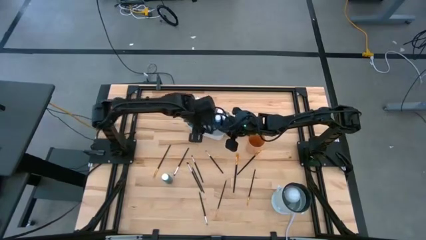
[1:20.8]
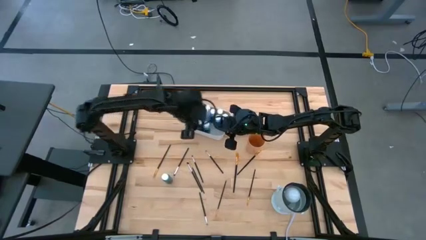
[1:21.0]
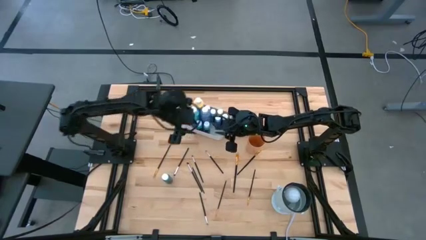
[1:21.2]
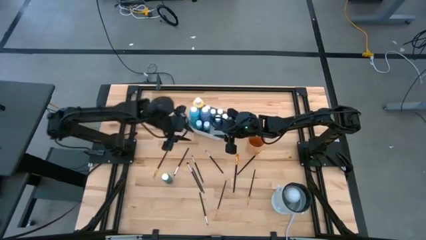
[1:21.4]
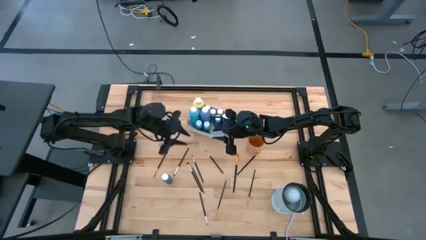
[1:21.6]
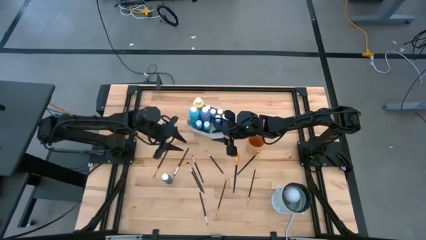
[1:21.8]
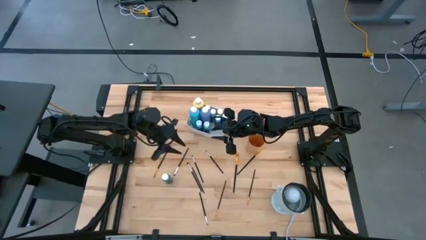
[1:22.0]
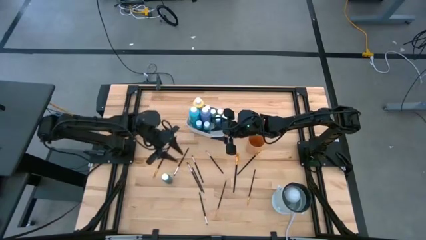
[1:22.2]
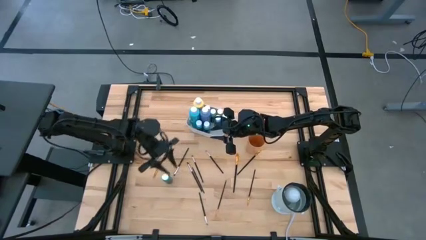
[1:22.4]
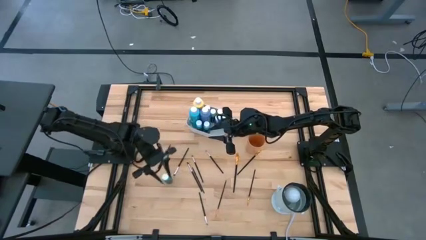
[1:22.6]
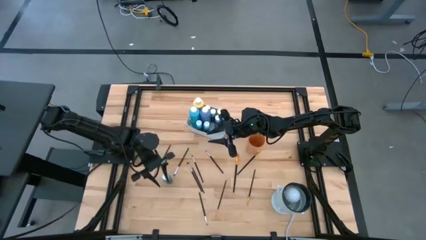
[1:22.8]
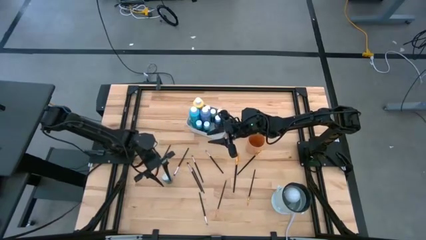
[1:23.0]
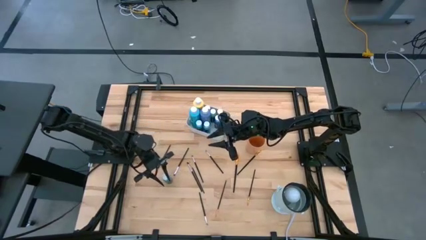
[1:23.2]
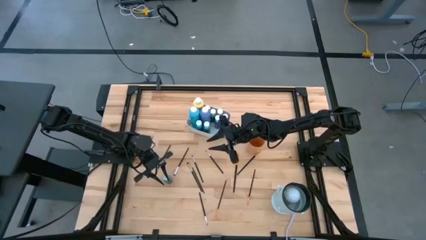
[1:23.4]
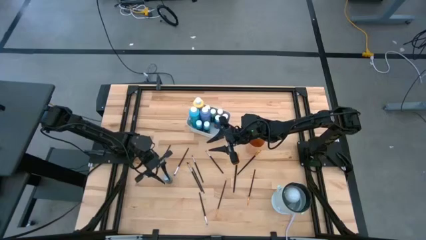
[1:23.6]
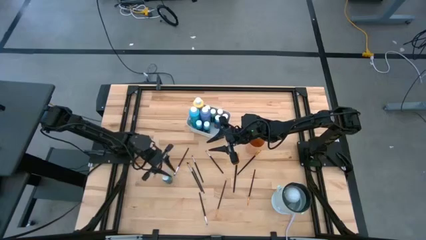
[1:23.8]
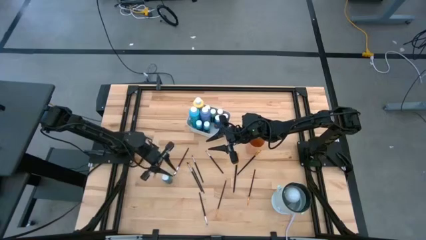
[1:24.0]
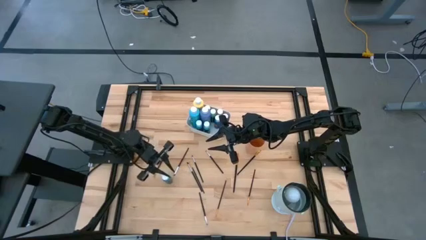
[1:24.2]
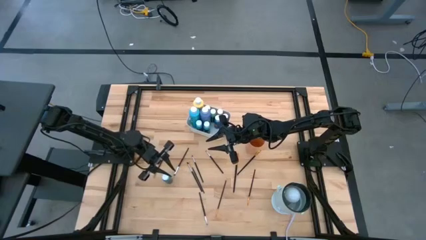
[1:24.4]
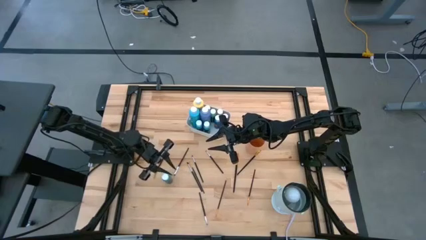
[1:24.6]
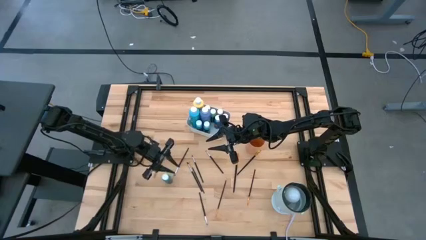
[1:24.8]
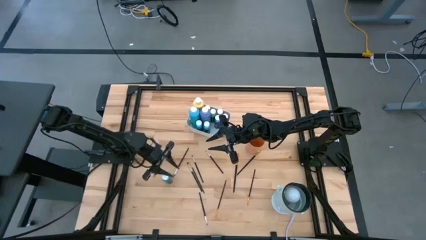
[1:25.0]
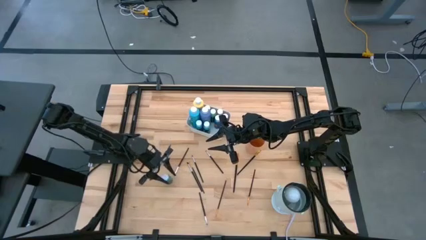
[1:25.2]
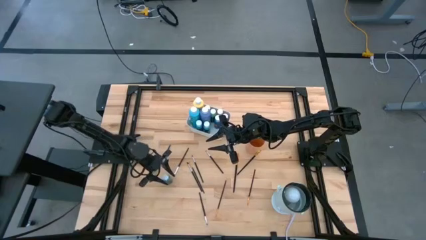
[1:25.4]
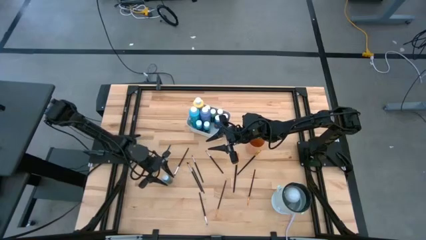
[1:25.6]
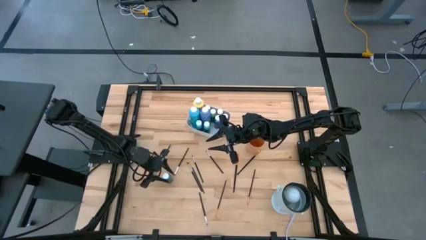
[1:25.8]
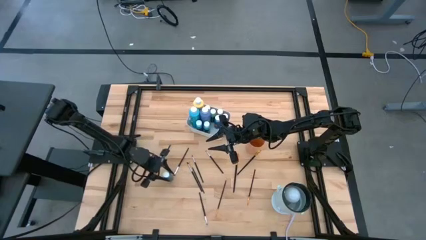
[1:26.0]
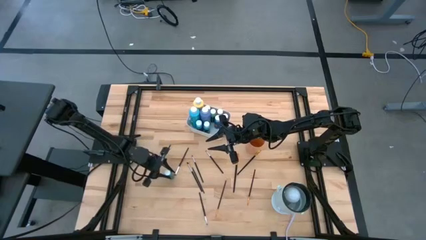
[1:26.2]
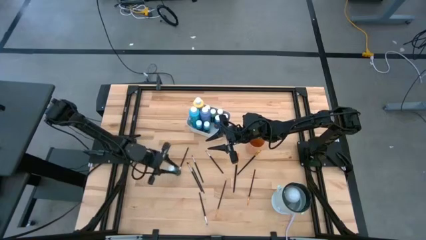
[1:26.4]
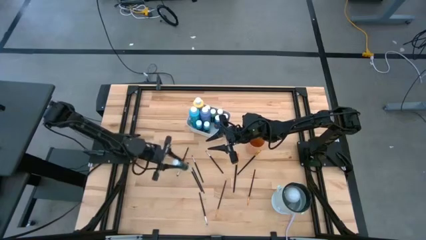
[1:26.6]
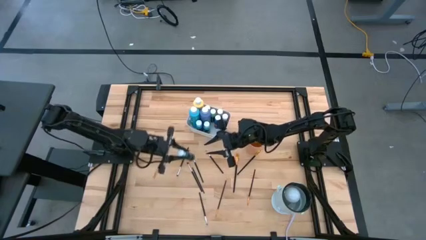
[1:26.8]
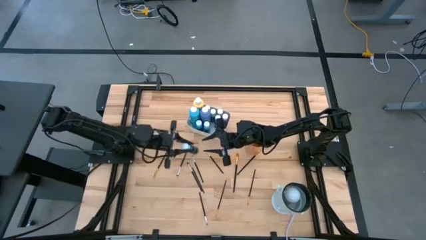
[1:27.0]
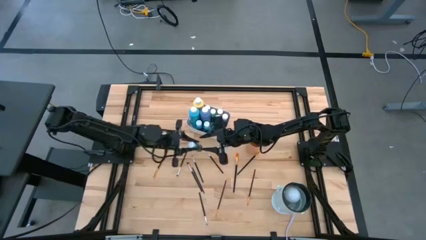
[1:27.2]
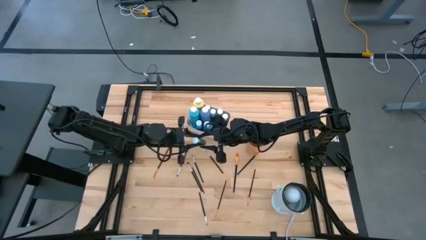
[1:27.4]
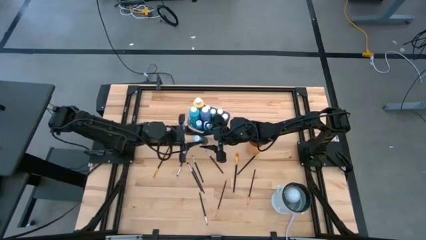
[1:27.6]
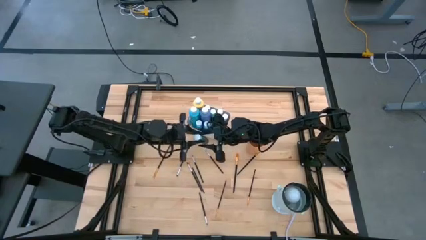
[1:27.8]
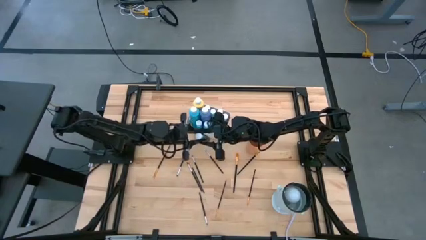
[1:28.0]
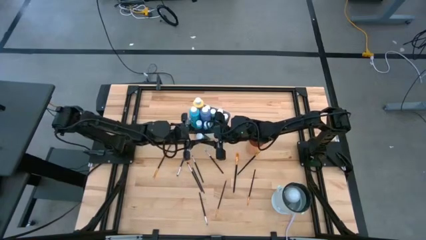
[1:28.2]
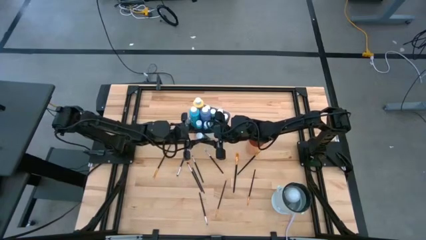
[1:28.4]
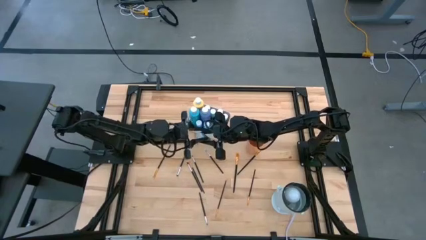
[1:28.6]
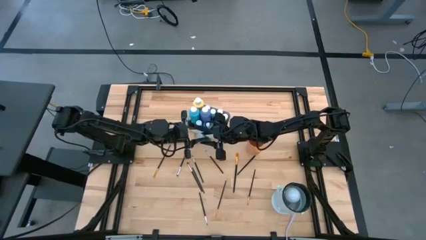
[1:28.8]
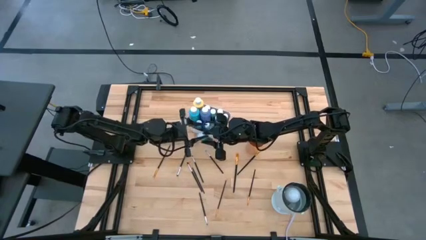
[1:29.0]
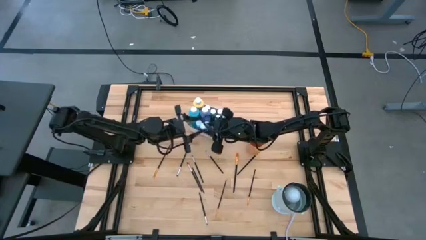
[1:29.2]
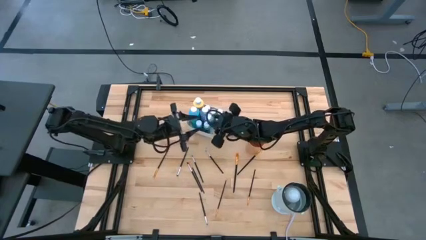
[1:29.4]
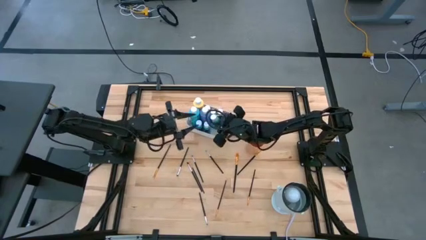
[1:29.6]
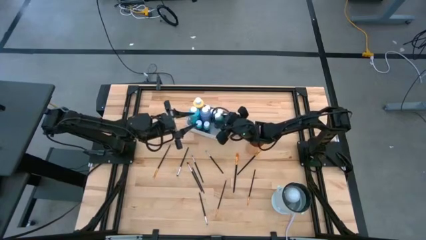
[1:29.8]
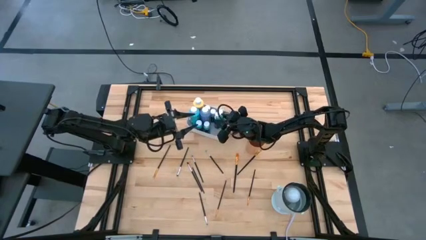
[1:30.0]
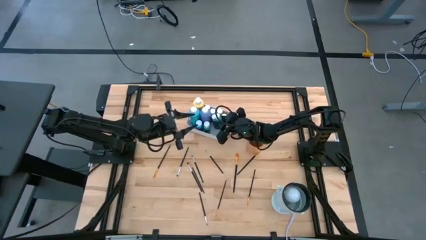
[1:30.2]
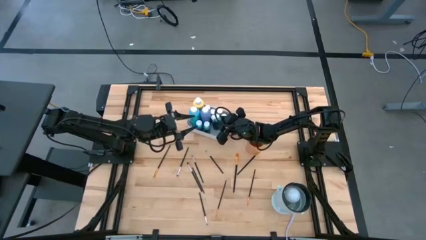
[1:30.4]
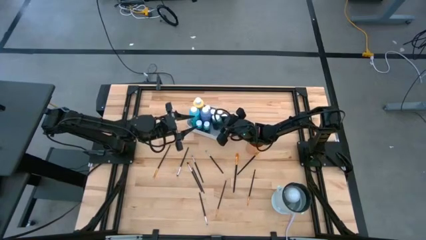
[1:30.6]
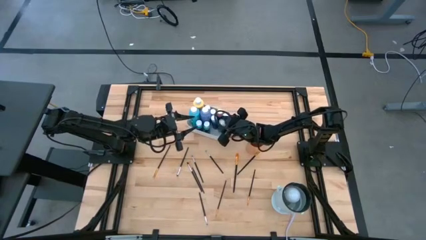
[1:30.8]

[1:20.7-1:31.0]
Task: Pick & Place Paint Supplies
Put the small paint bottle into the bin

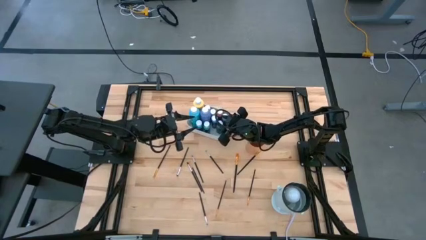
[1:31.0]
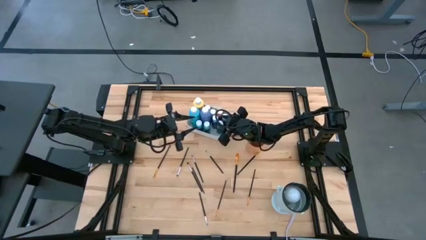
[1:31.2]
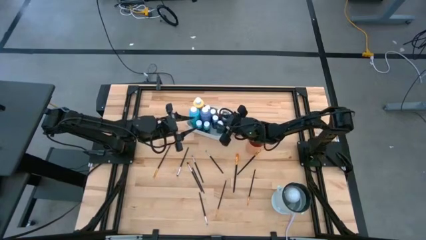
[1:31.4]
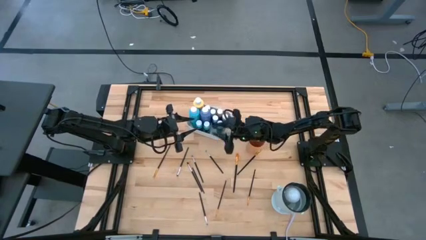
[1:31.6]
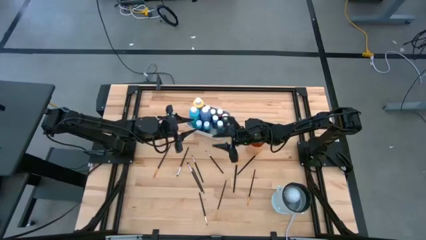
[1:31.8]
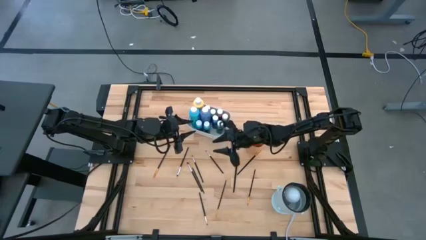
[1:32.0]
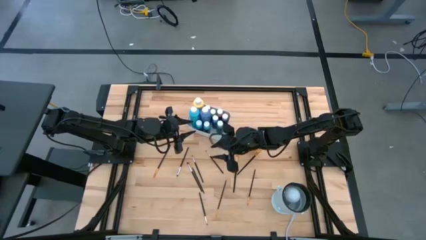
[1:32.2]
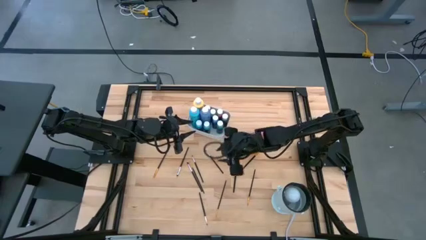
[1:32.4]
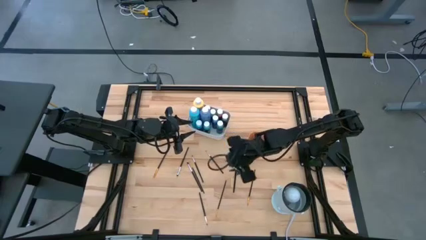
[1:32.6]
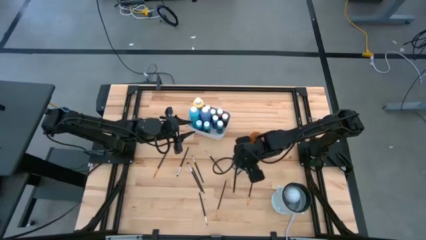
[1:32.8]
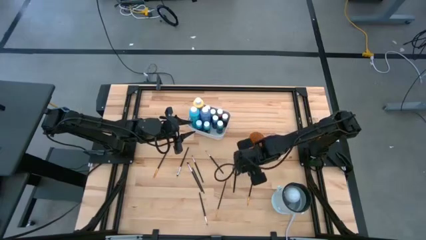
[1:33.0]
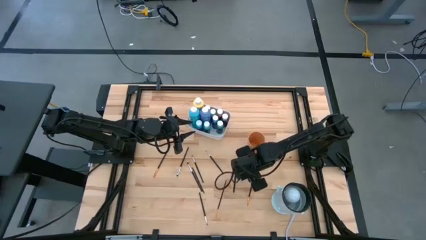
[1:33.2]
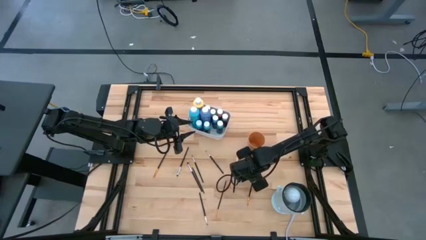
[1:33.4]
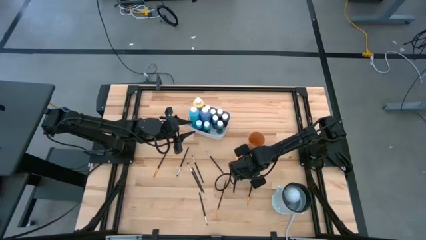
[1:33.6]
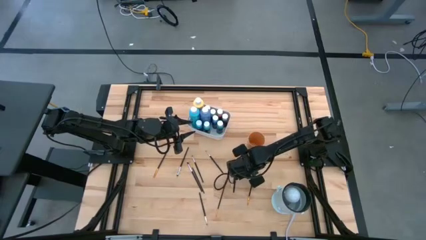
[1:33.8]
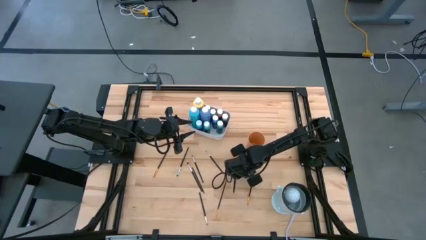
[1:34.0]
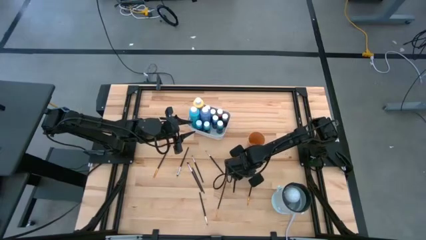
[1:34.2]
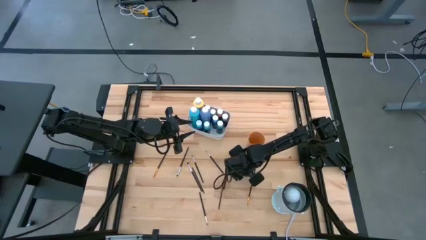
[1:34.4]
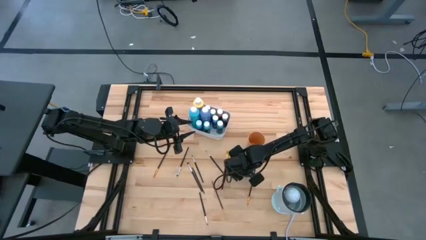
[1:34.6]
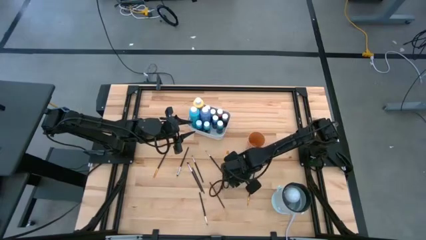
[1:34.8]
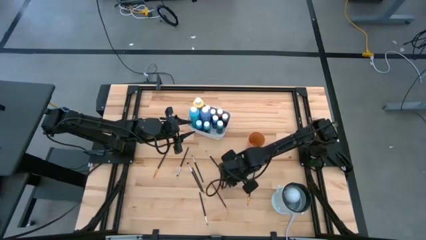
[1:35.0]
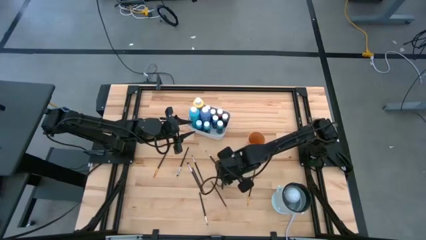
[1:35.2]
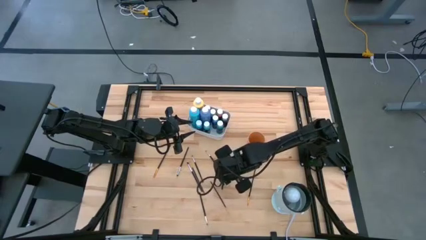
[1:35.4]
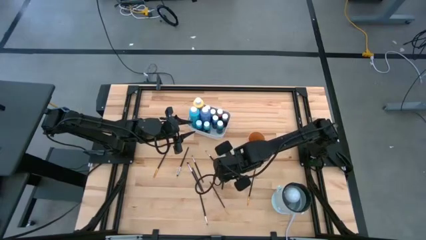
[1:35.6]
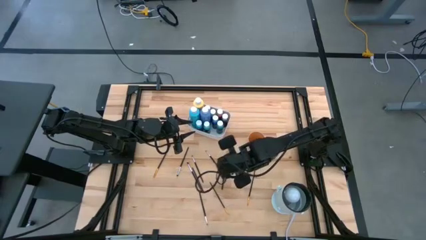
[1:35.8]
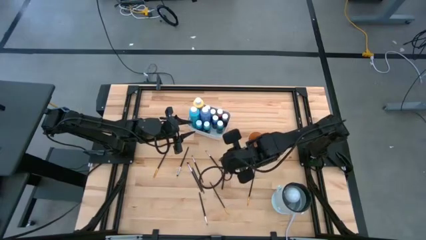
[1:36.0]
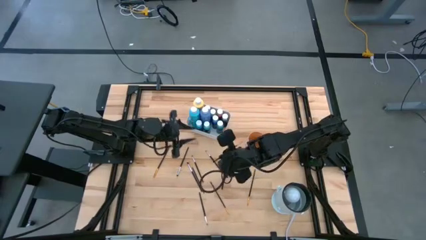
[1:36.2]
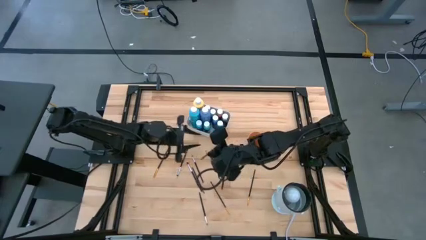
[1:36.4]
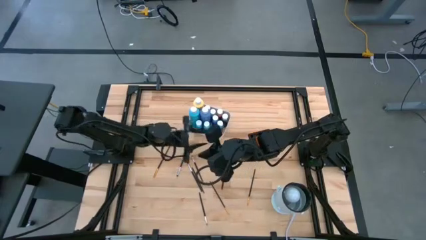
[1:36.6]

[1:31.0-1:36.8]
Put the gold paintbrush into the cup
